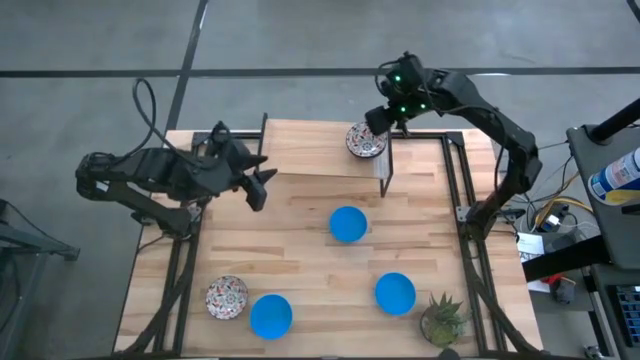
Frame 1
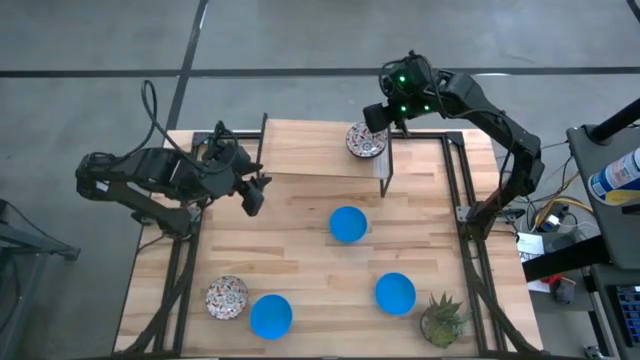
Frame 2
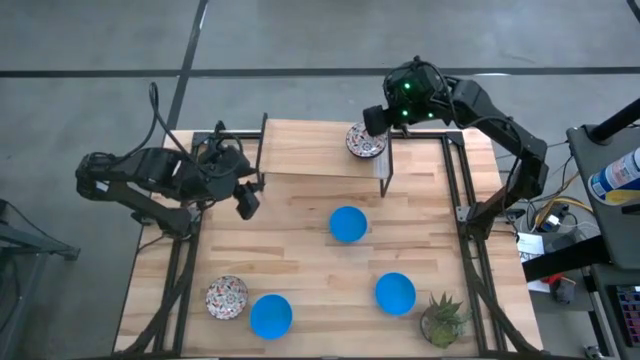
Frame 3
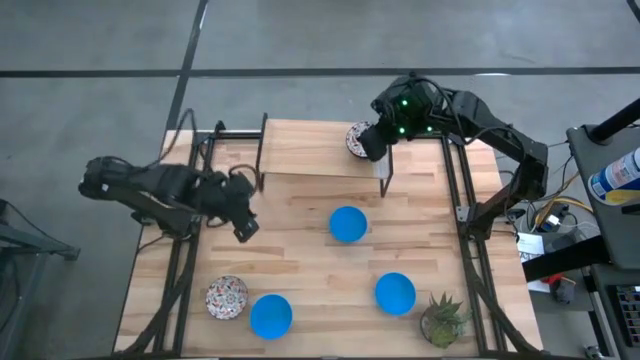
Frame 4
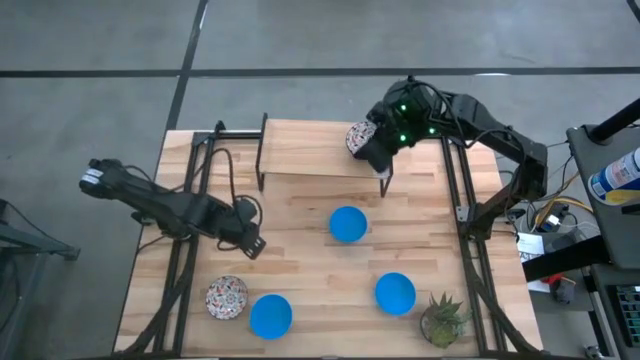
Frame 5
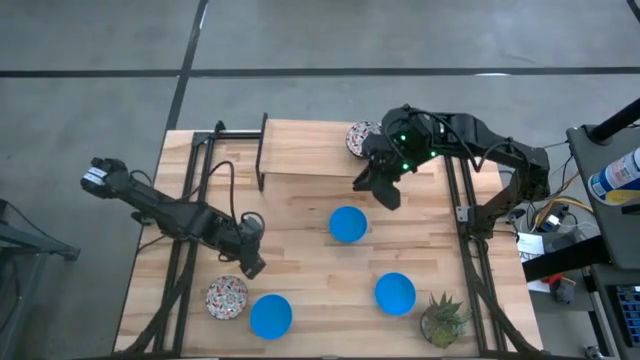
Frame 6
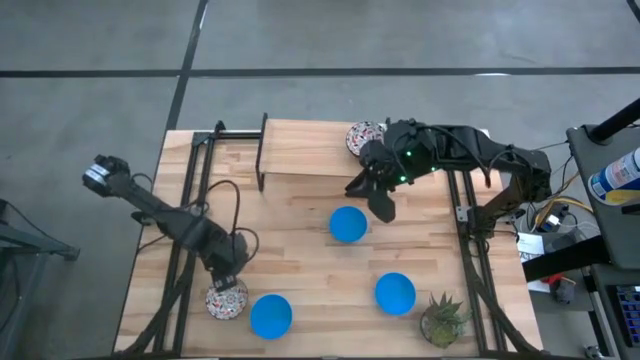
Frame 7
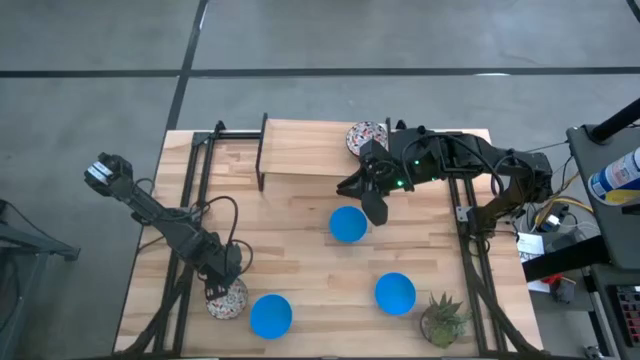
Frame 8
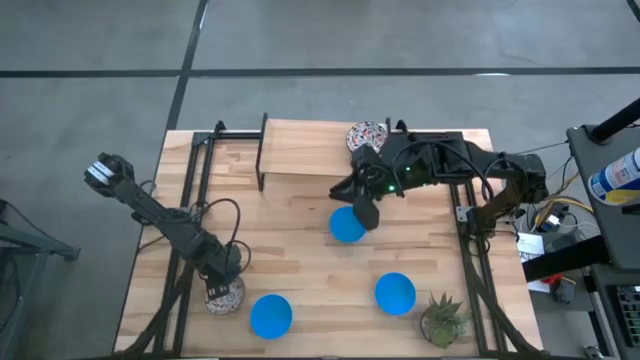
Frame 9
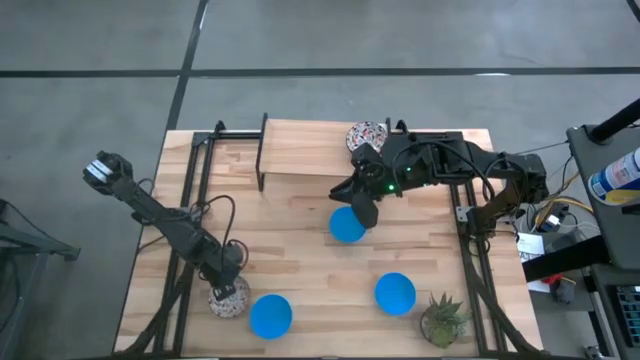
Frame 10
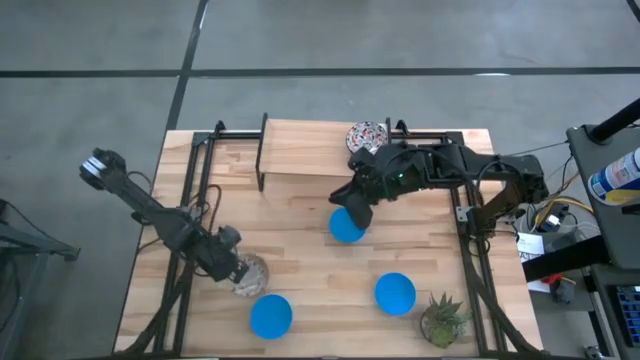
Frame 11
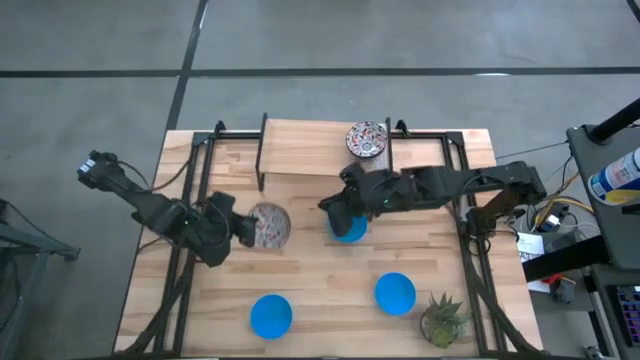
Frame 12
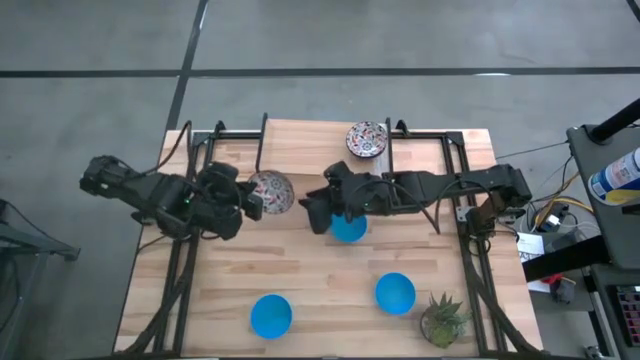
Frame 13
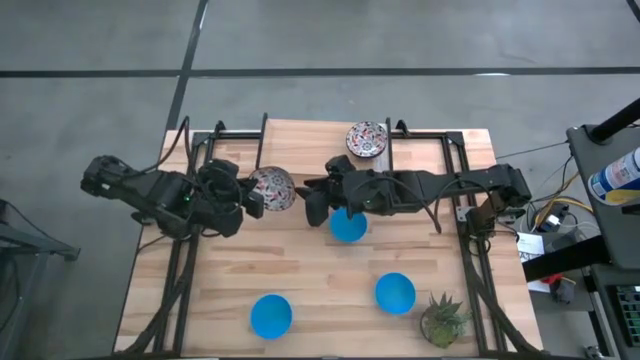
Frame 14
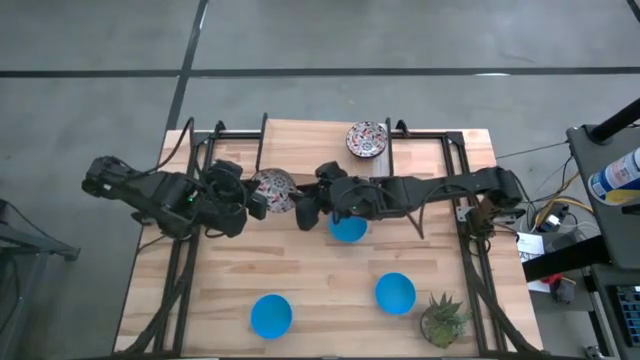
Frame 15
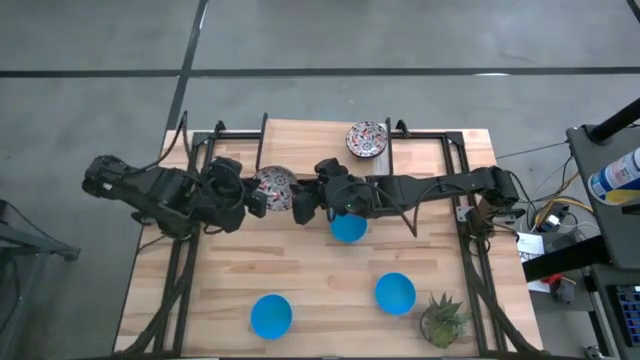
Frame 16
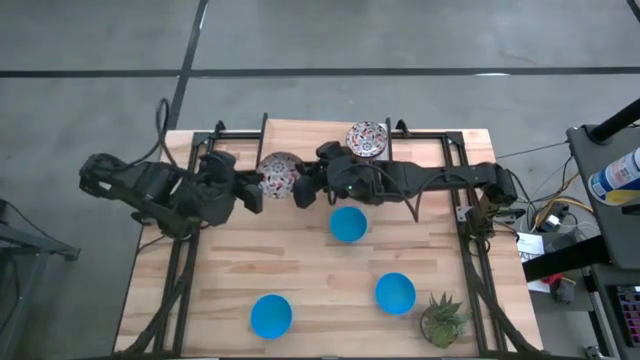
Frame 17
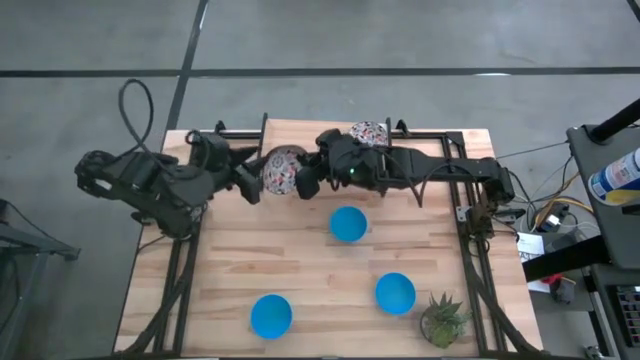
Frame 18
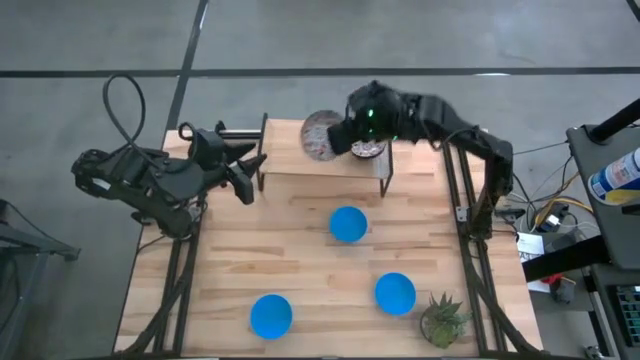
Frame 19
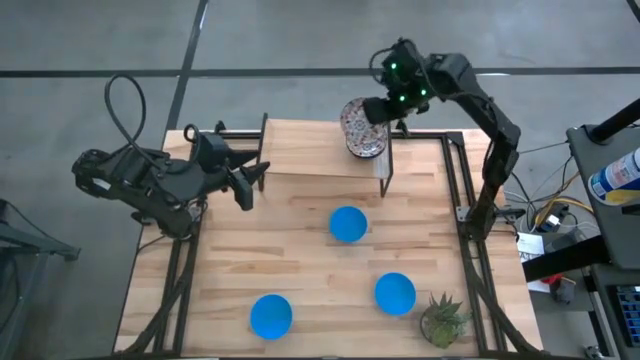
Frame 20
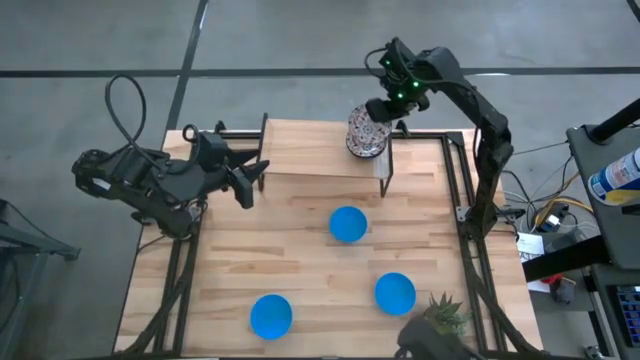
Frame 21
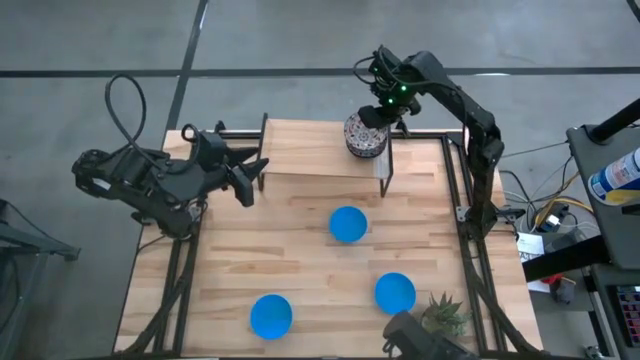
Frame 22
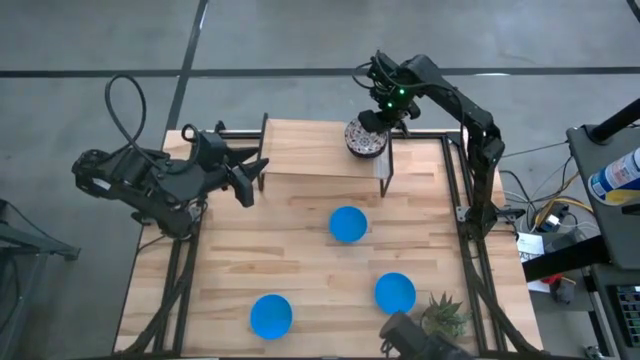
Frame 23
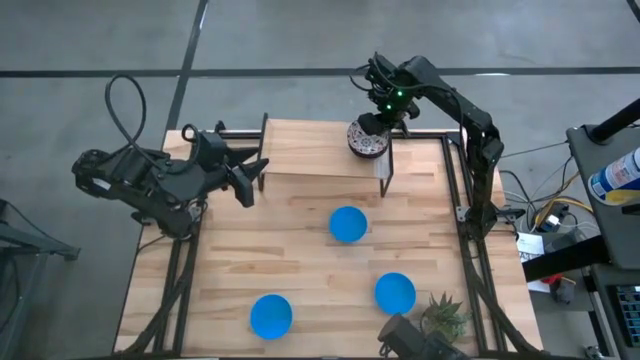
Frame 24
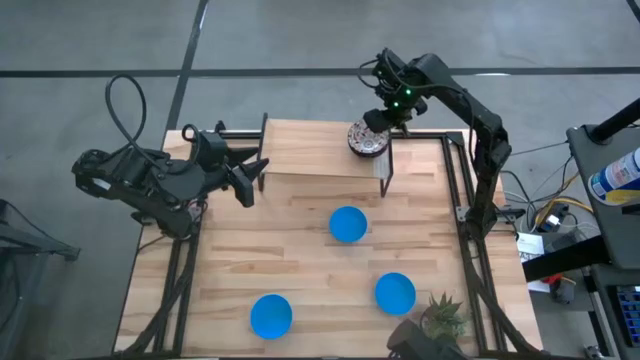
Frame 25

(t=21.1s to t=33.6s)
Task: Pick & Place Mini bowls
Stack the white bowl on the other white bowls on the shelf

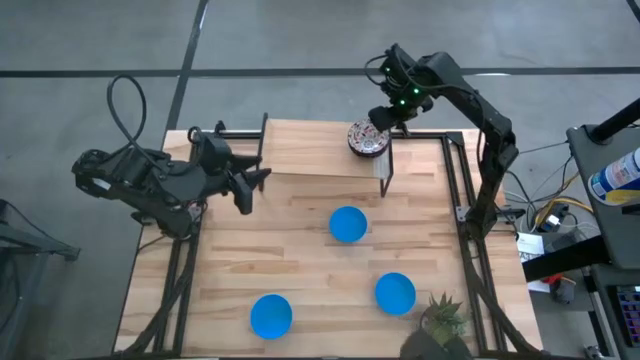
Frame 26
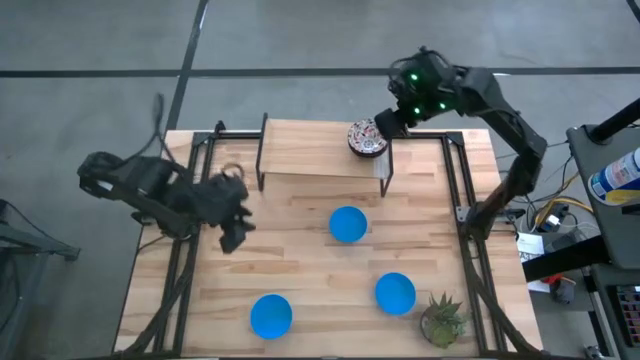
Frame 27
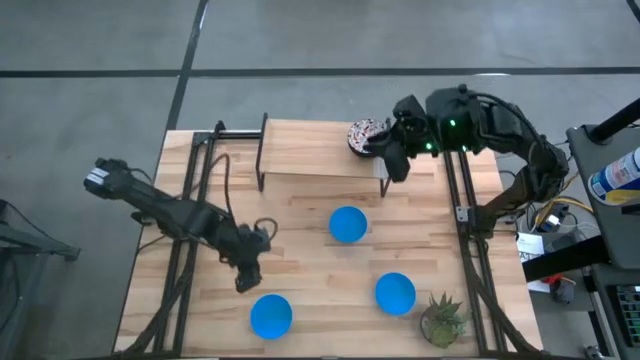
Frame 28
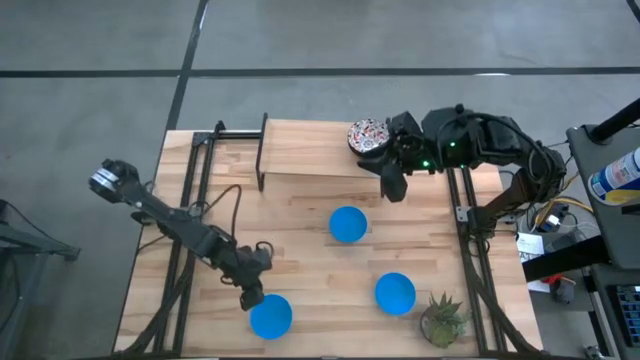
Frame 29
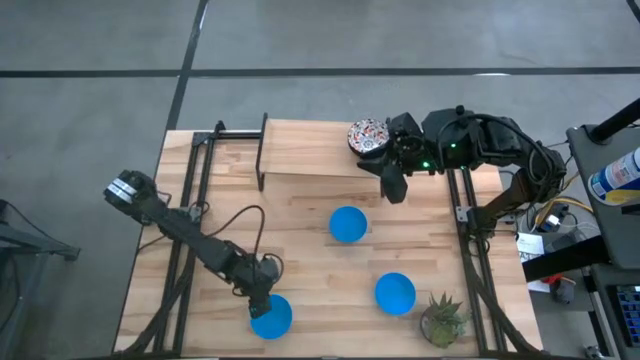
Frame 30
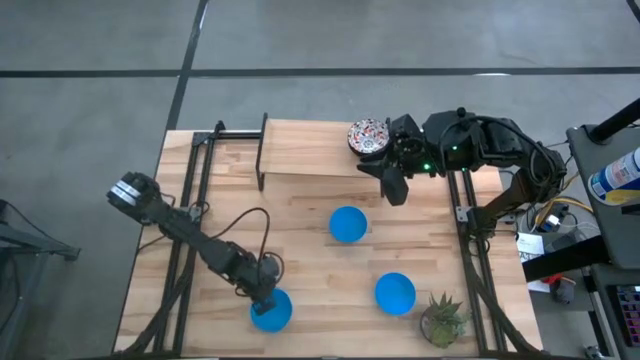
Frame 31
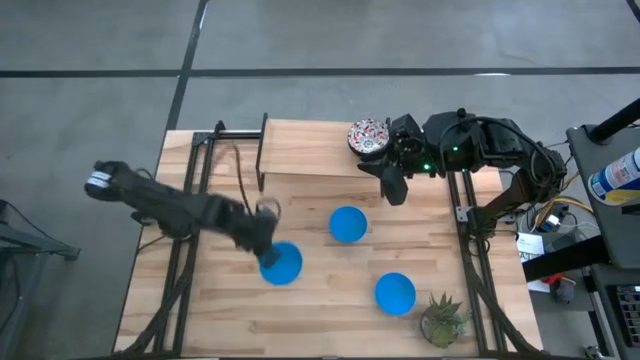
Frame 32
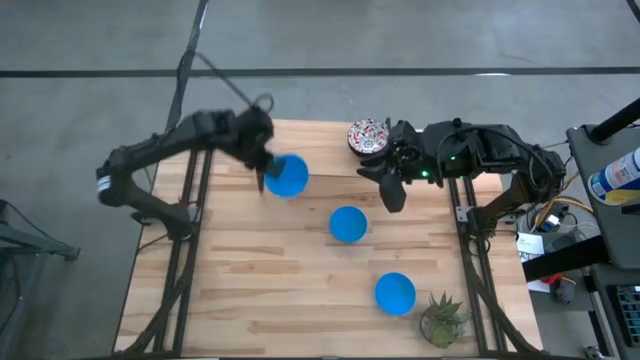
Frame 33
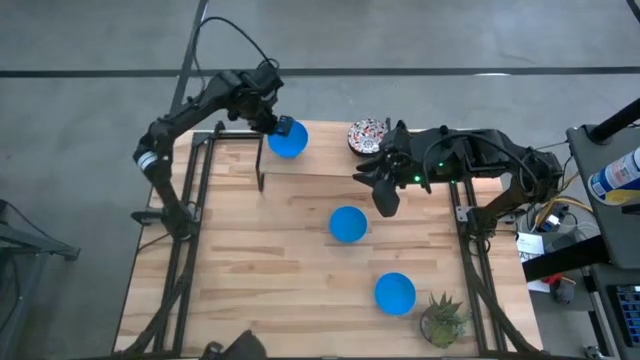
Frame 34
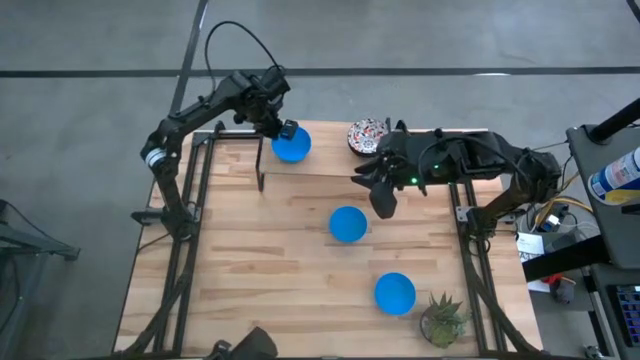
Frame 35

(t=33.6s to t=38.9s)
Put the bottom left blue bowl on the shelf

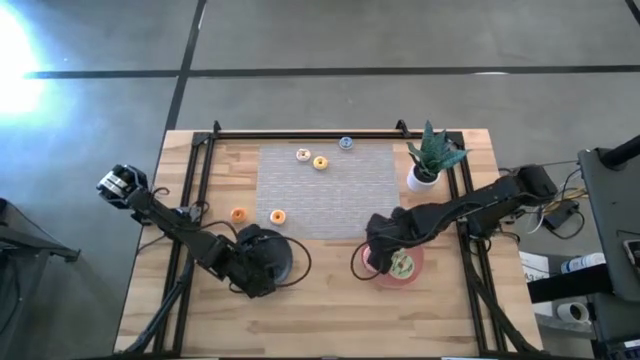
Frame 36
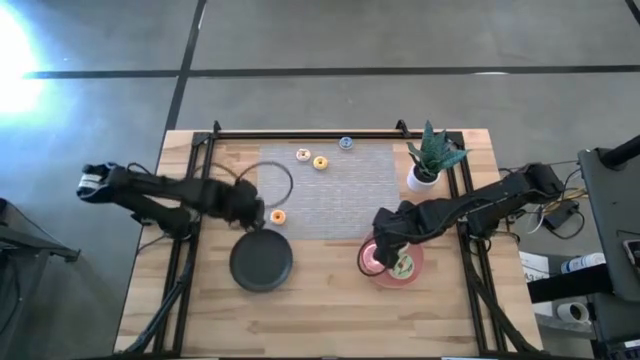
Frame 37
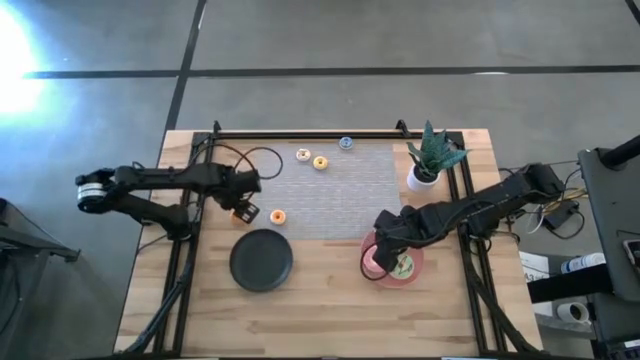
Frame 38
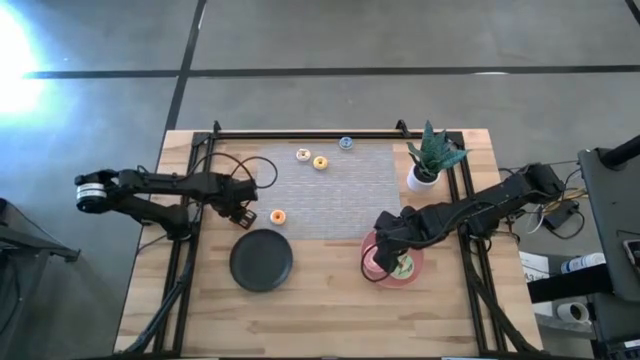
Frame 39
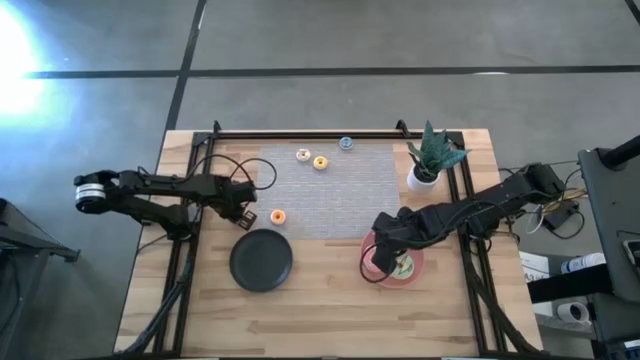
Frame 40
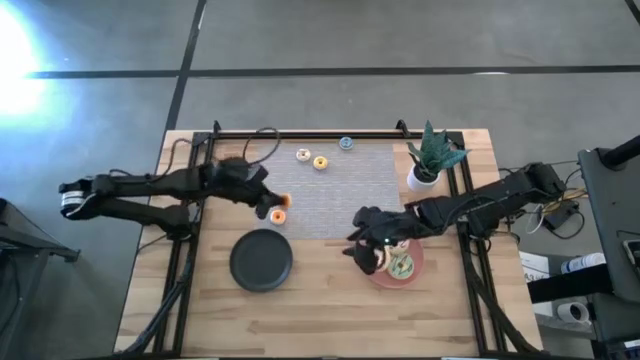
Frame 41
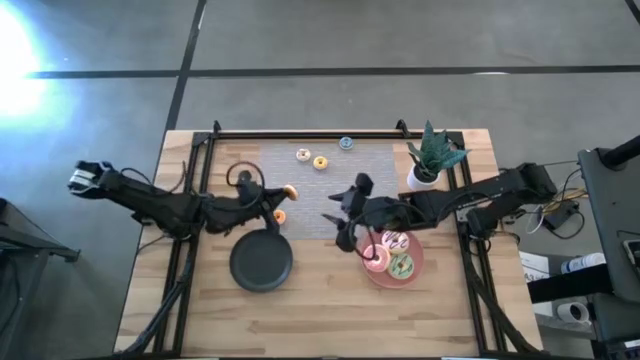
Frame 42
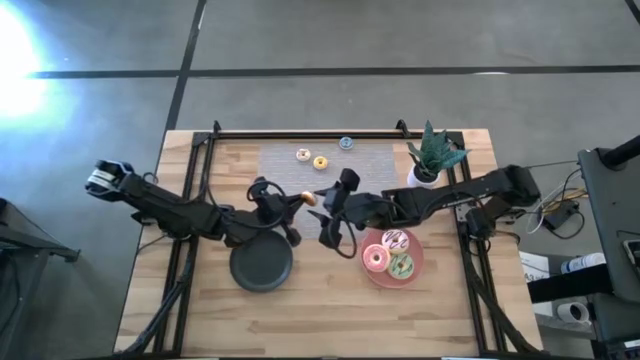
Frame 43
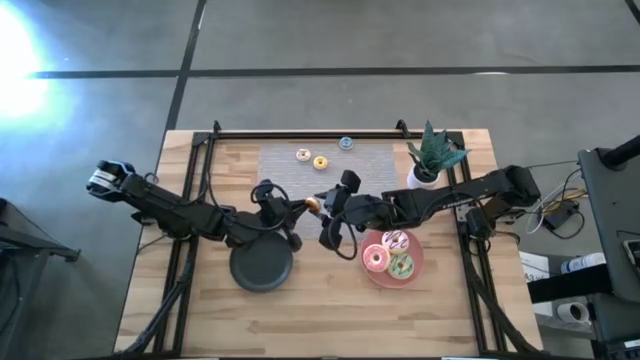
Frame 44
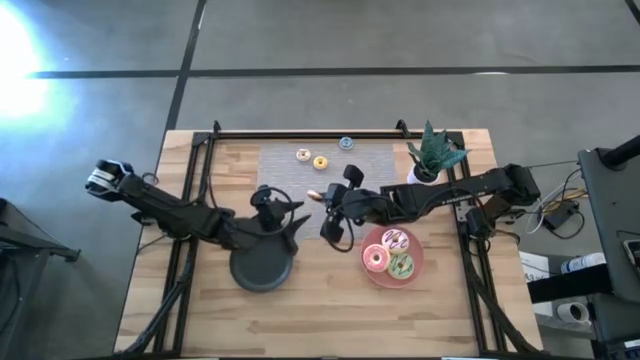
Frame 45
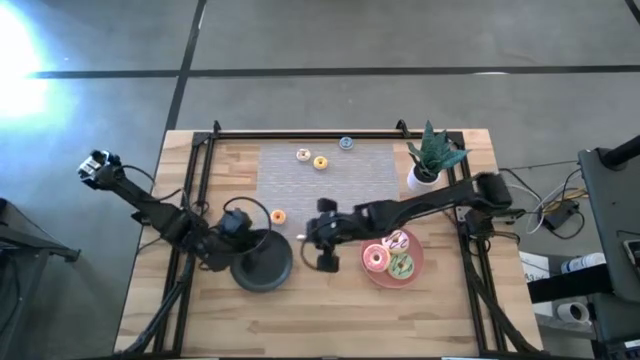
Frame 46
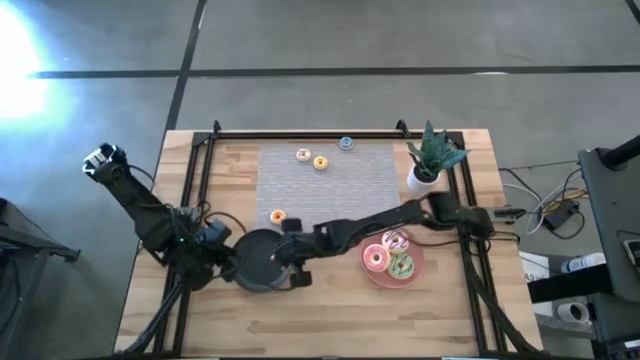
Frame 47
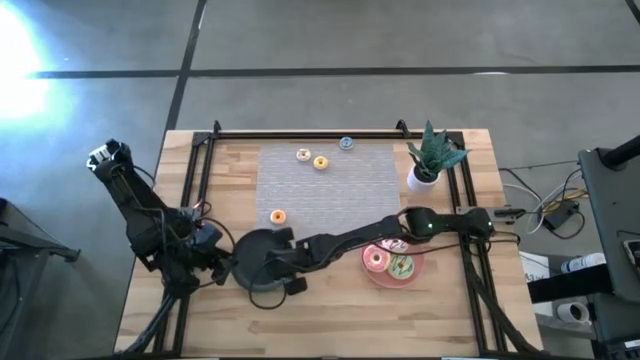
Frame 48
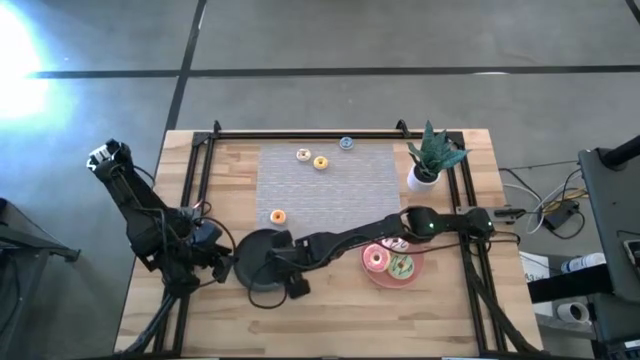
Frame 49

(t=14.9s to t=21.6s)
Task: Pick & Place donuts
Put the left small pink donut on the black plate
